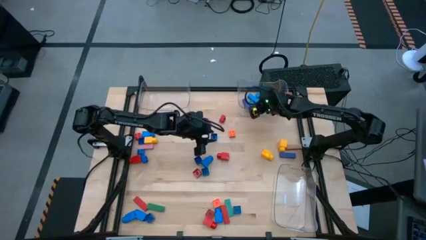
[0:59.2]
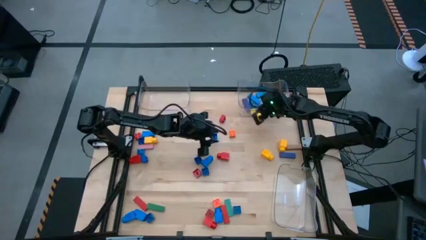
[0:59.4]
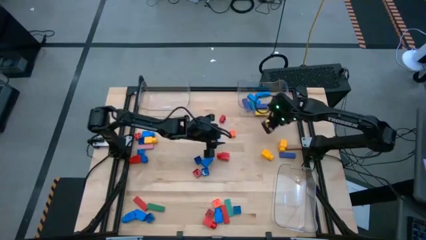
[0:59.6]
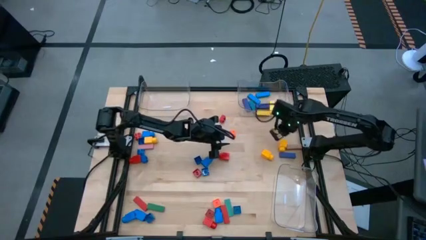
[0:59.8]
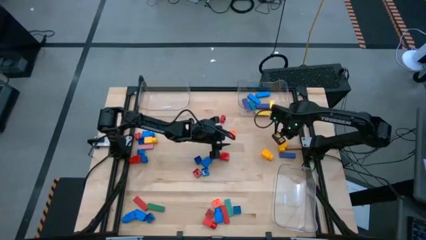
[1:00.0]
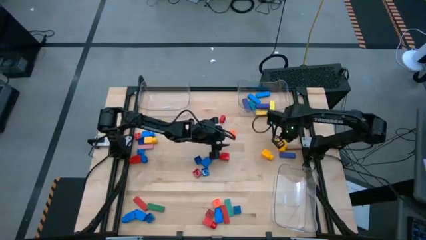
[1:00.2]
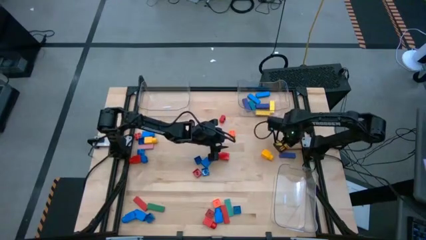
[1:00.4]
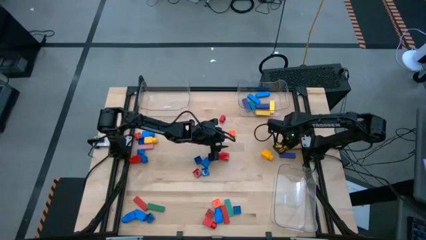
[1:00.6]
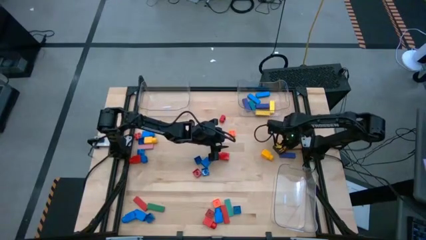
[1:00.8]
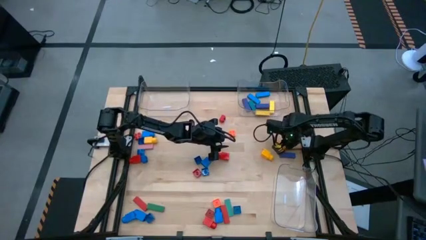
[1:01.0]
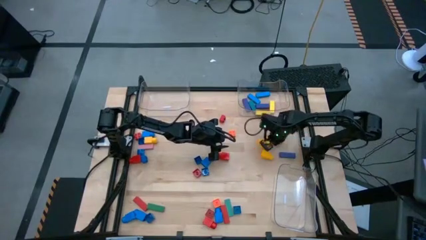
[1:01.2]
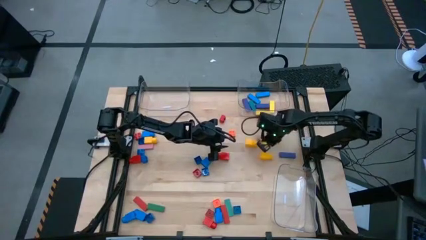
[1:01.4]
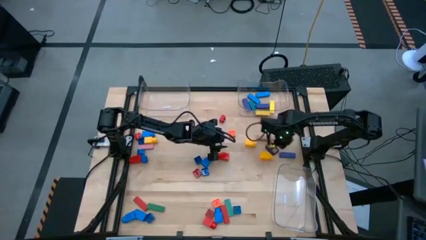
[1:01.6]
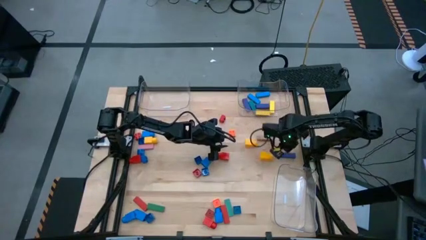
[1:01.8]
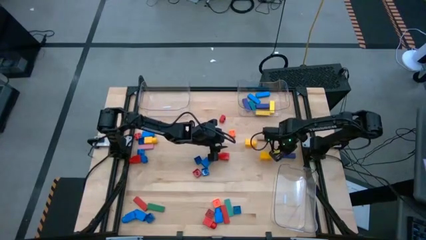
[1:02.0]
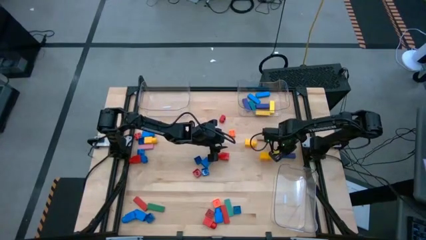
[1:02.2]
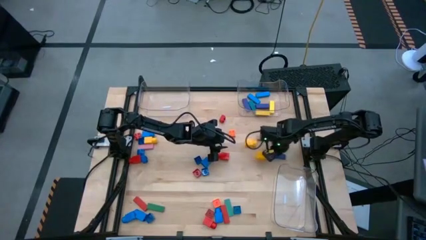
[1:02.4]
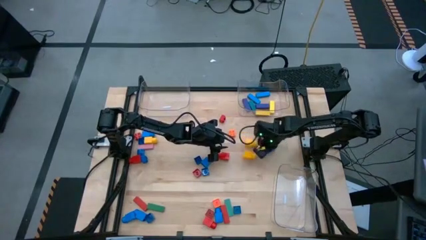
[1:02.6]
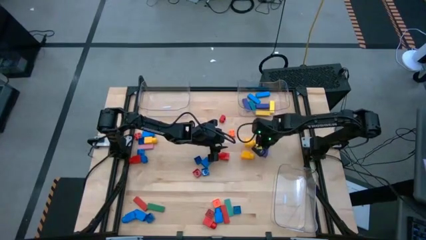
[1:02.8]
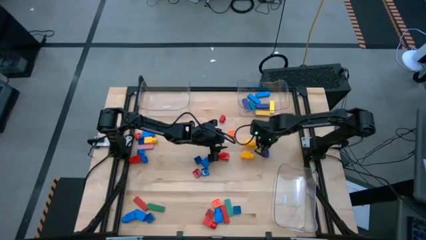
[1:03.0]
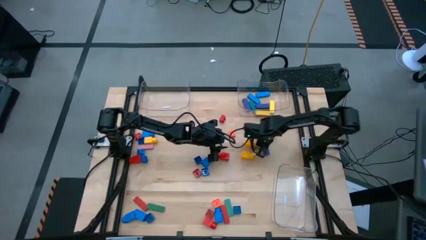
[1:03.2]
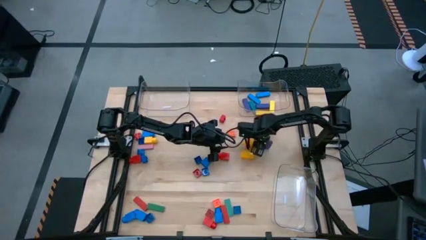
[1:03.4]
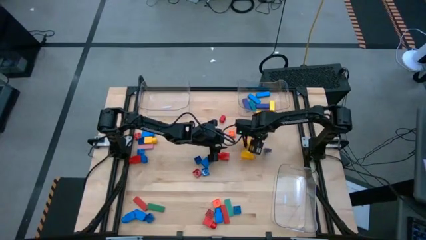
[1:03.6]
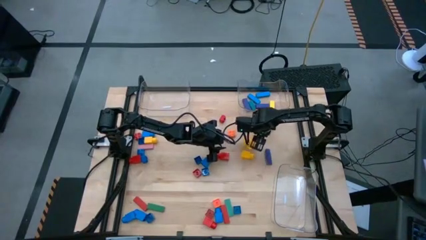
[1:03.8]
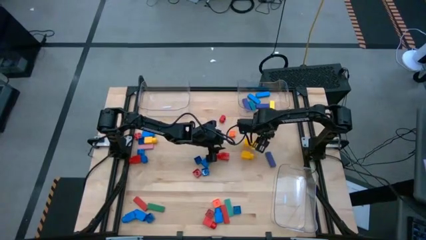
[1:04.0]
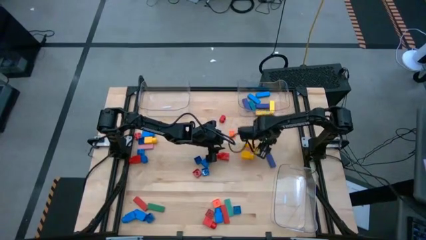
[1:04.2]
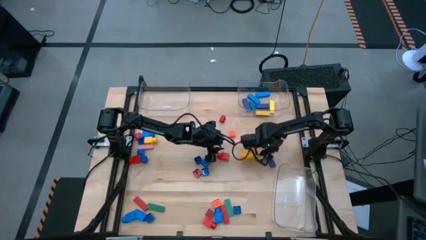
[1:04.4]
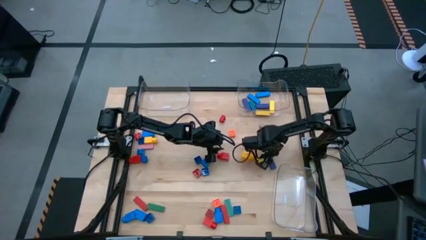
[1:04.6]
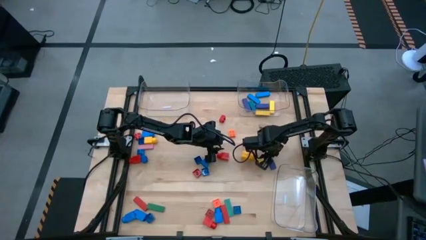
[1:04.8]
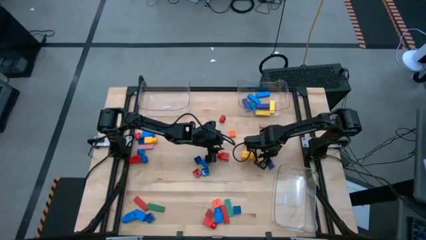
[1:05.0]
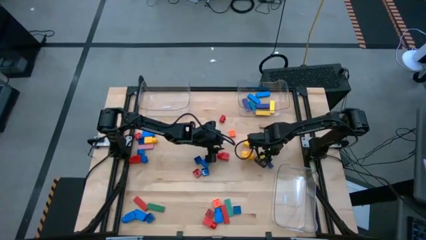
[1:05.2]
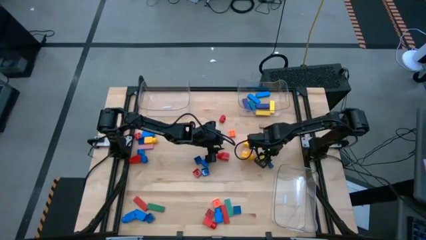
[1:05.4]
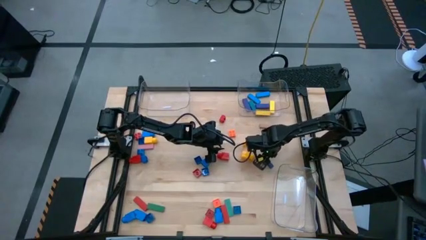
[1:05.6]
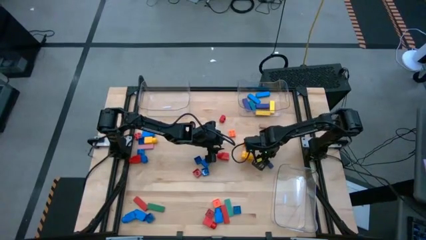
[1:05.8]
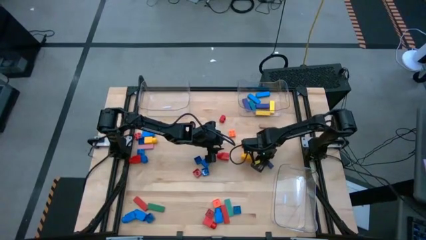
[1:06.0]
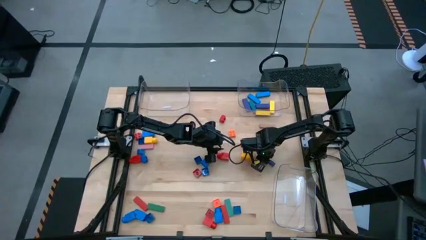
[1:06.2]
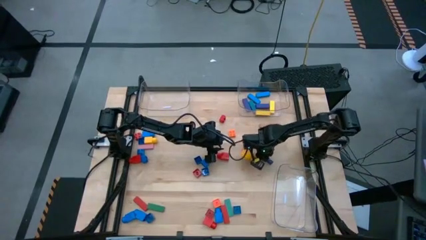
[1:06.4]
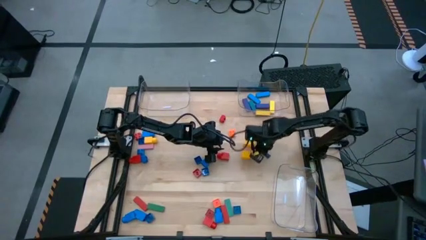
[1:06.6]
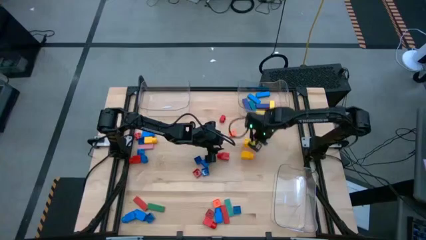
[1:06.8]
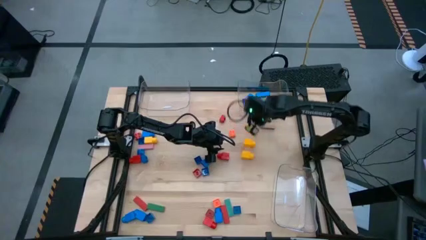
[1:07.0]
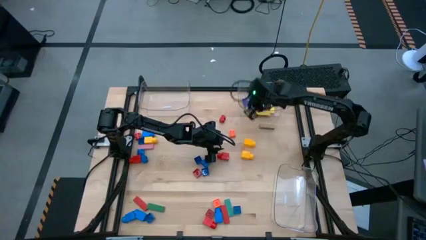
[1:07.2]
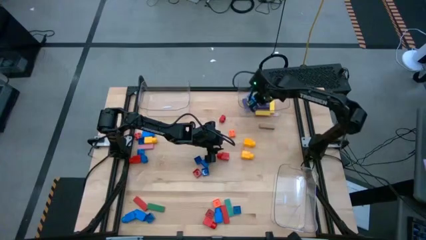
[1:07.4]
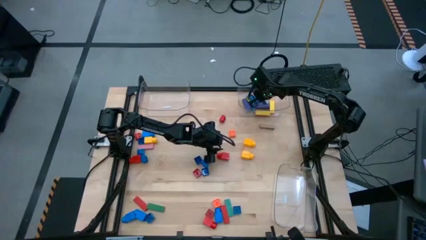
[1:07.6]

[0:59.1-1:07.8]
Task: Sort blocks by size
Put the dark blue block into the top right transparent bin

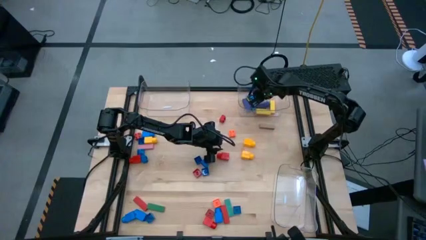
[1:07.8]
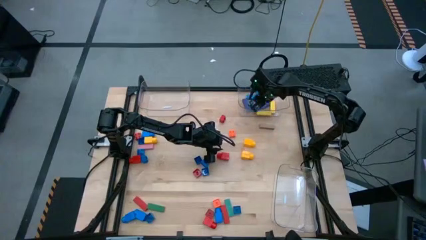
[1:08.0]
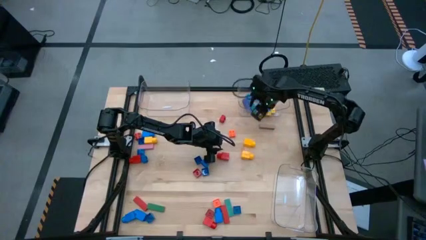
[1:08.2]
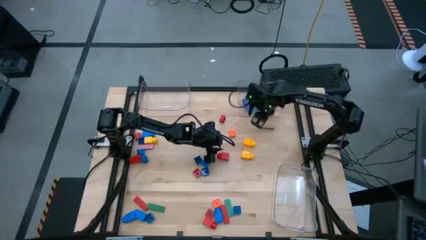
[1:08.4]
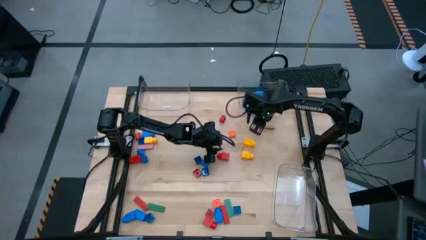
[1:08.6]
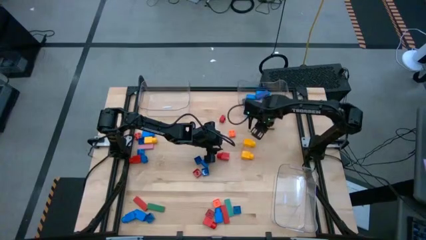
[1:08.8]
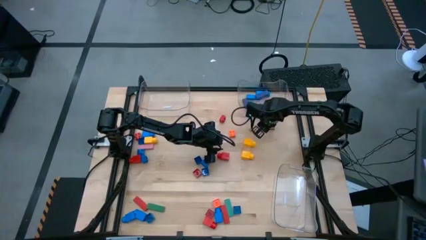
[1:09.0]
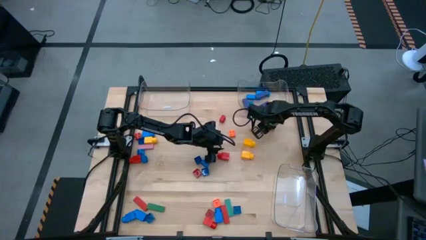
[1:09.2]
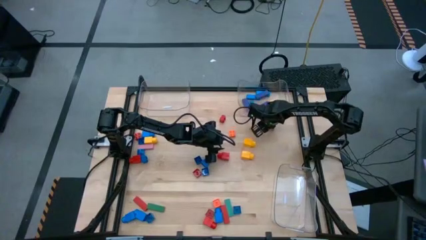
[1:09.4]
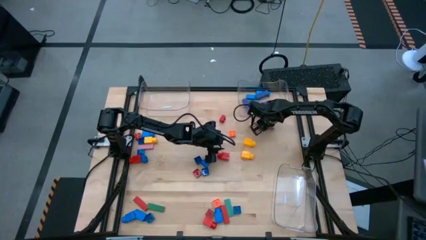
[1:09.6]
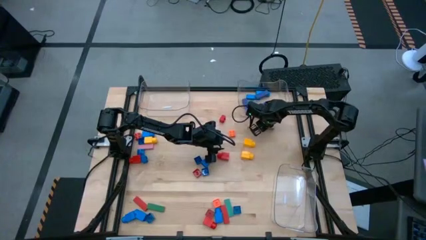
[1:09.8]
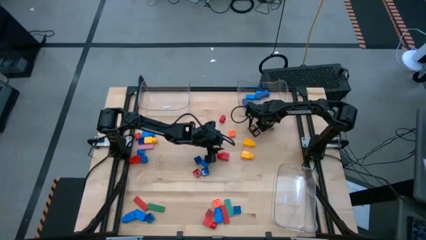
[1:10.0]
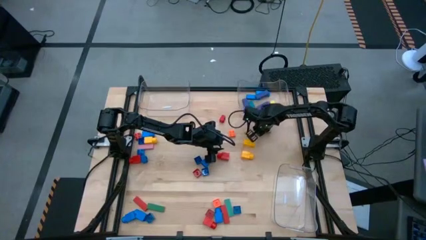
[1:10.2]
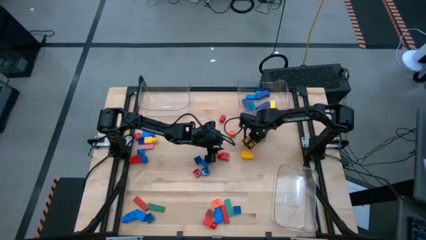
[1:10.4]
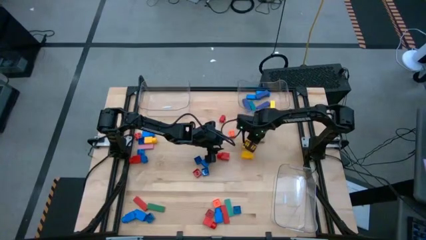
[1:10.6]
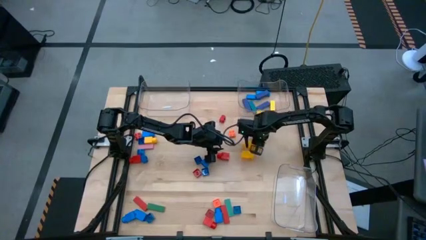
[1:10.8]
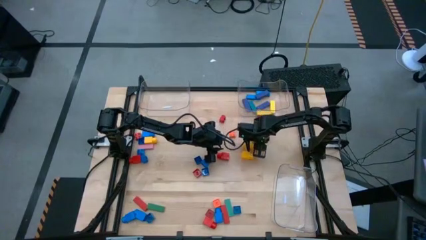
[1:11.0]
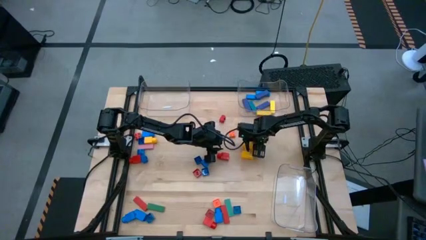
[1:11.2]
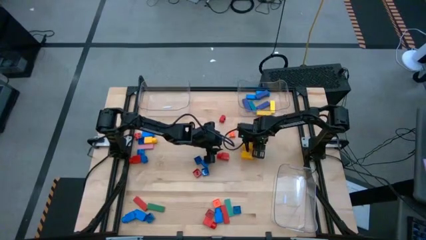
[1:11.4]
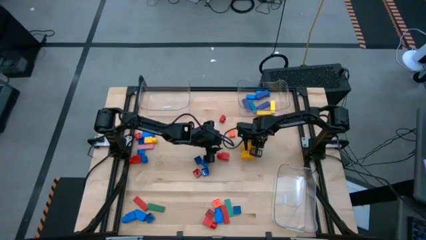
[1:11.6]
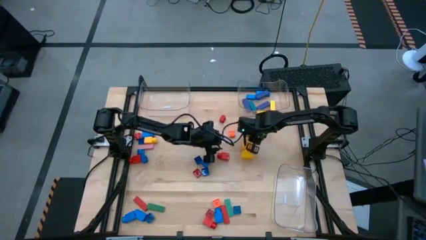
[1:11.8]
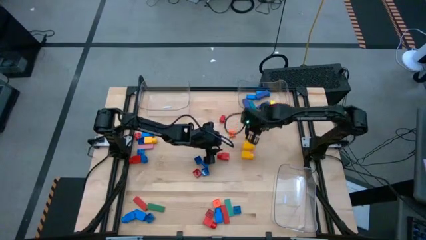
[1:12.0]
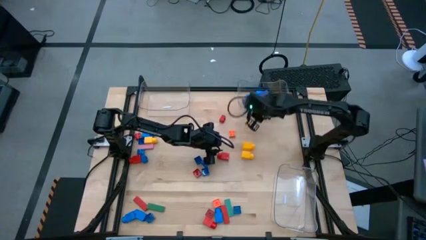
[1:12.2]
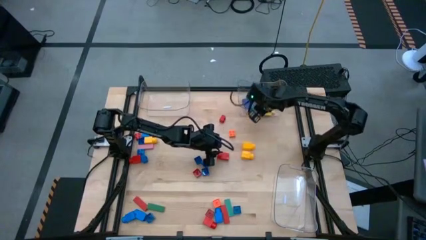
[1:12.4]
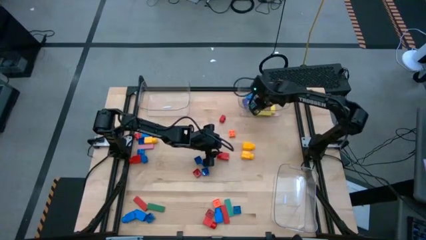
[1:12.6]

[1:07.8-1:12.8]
Put the brown block into the top right transparent bin

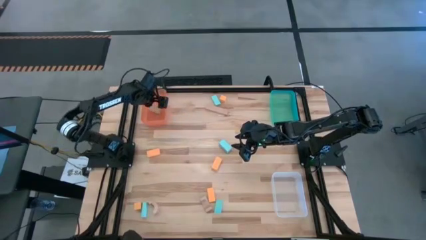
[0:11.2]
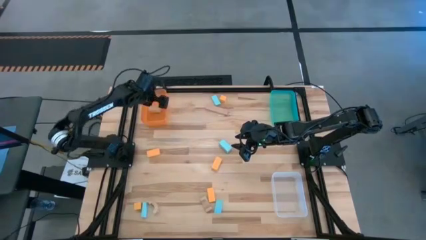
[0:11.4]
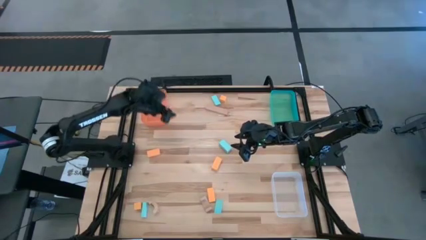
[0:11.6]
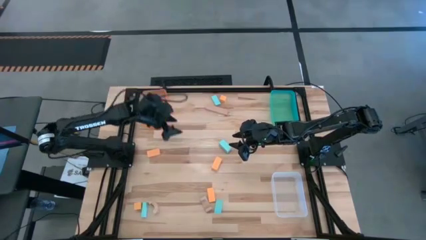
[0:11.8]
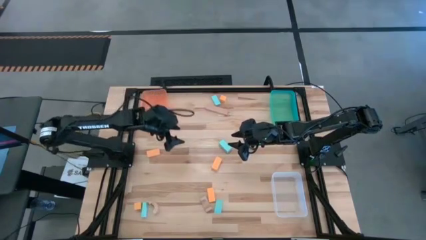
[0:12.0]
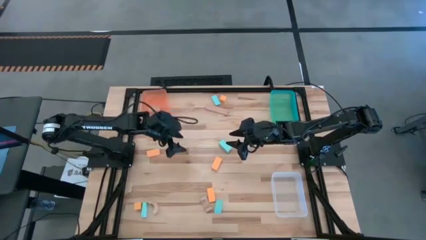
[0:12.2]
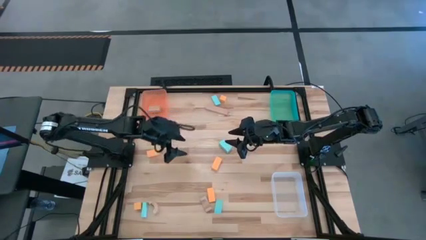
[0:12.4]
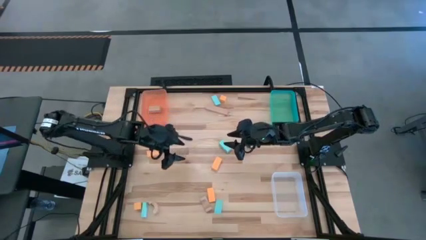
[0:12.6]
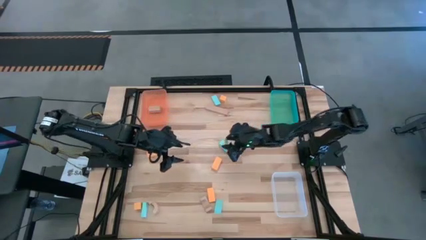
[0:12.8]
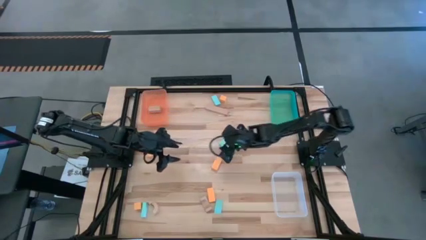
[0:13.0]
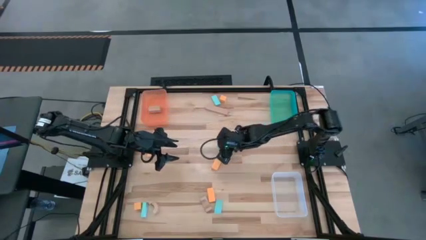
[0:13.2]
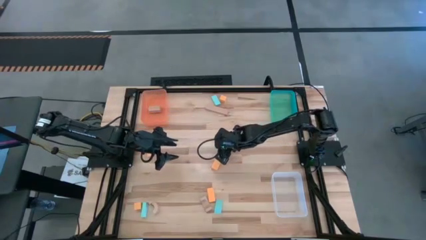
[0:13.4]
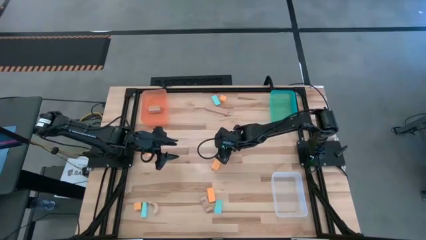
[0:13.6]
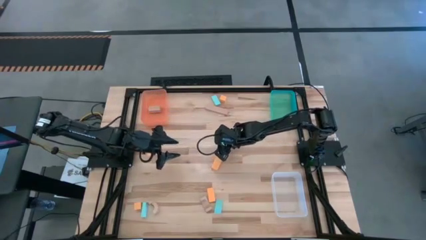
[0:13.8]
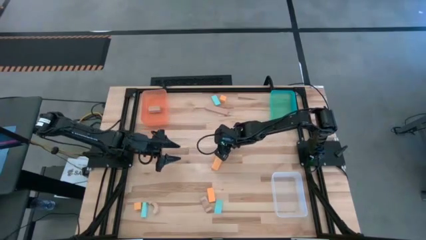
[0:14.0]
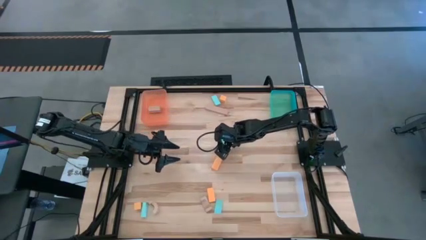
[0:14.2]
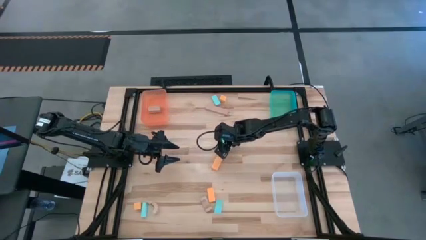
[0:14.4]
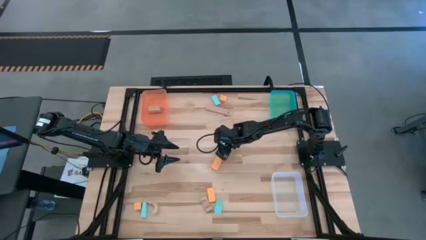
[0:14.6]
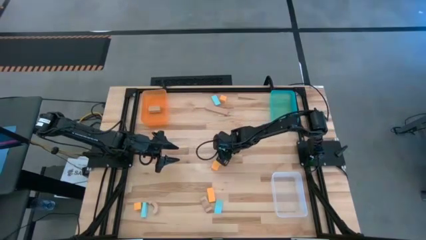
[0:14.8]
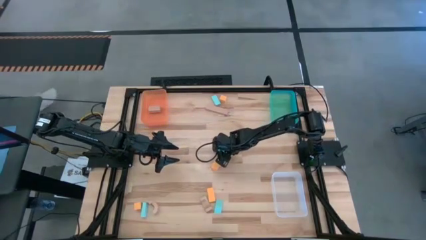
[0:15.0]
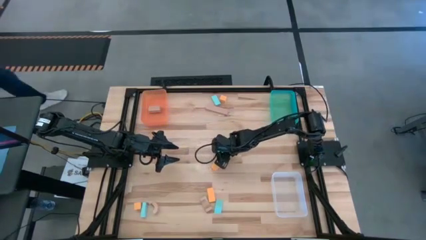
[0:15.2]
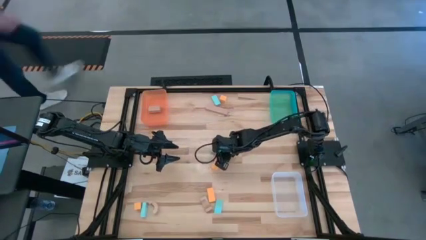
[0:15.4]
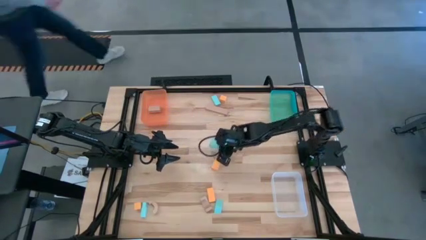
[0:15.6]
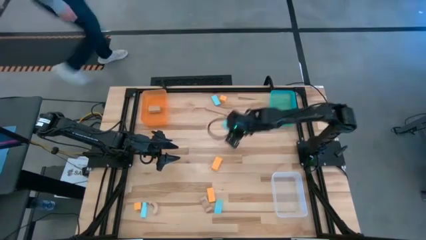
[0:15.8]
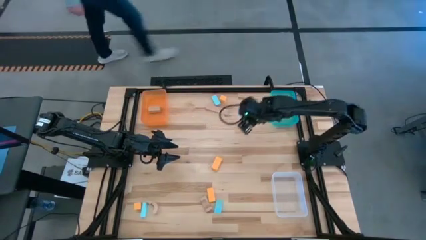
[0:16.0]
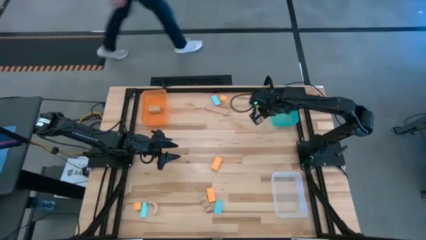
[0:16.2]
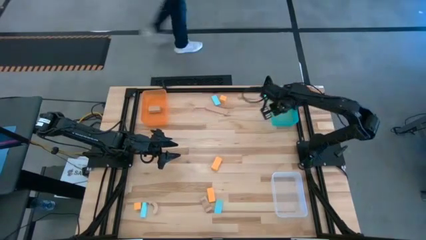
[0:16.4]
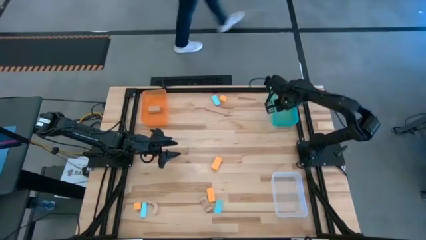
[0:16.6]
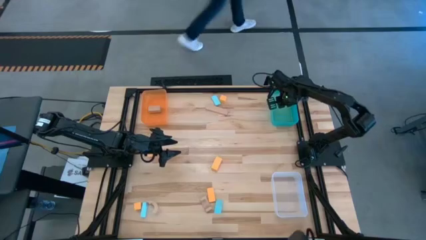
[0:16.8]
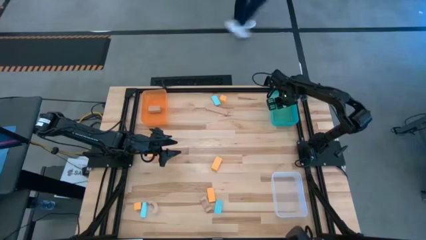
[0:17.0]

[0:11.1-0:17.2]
Task: Sort & place blocks by color
Put the blue block into the blue bin
